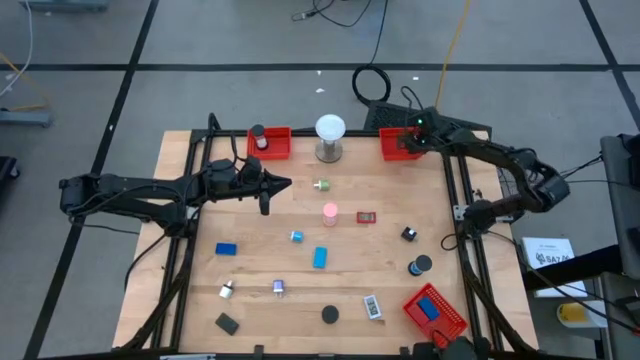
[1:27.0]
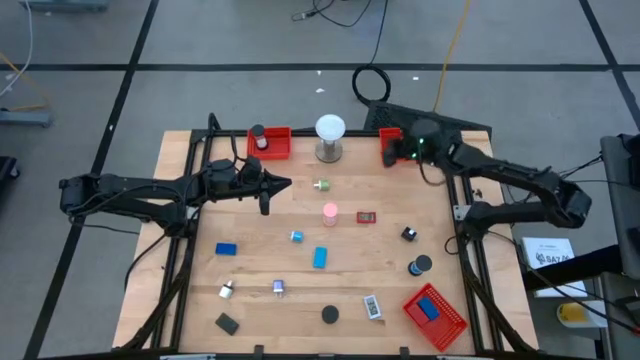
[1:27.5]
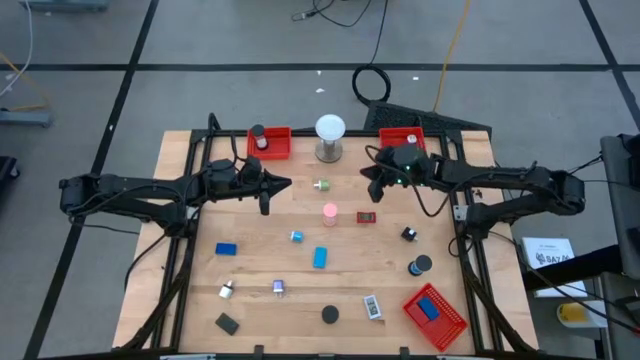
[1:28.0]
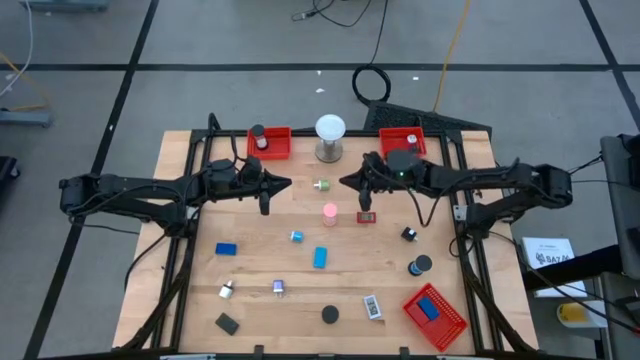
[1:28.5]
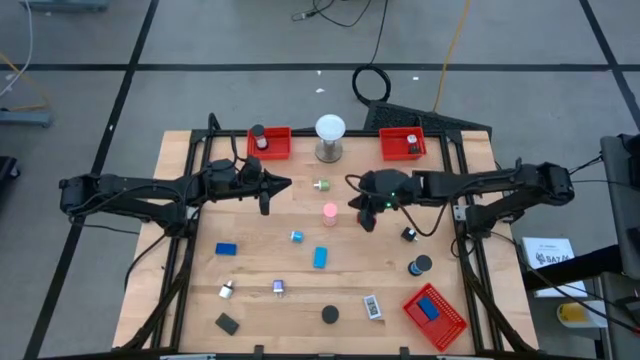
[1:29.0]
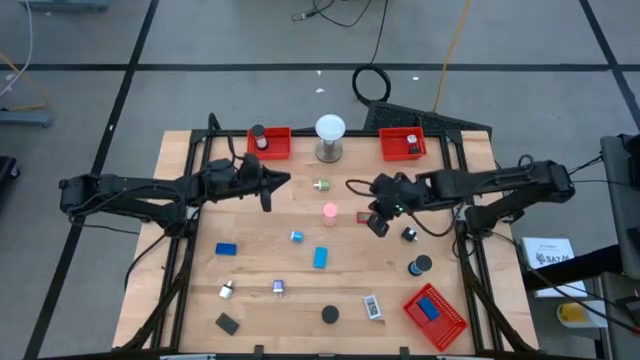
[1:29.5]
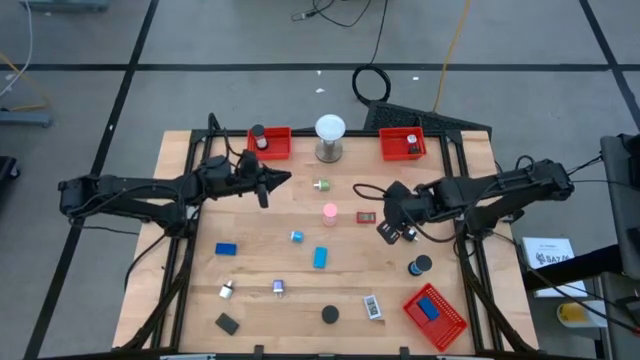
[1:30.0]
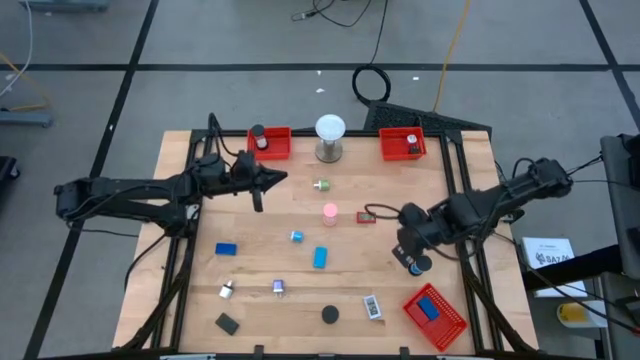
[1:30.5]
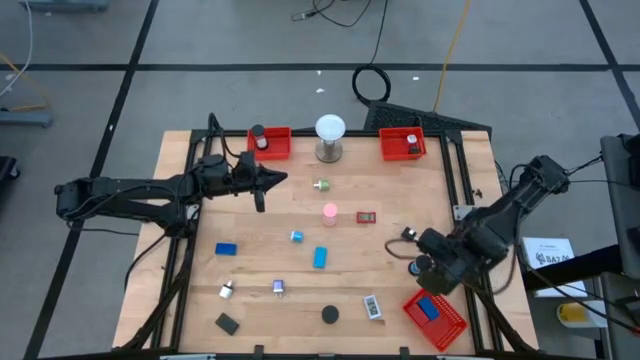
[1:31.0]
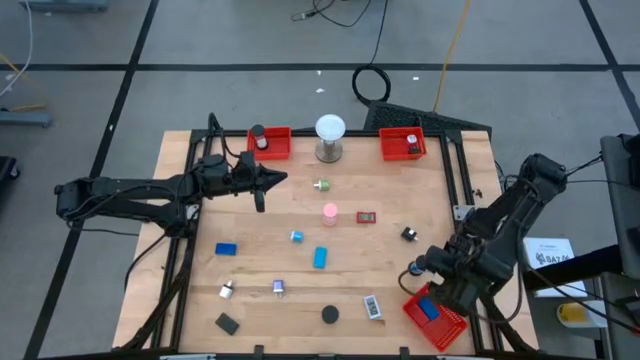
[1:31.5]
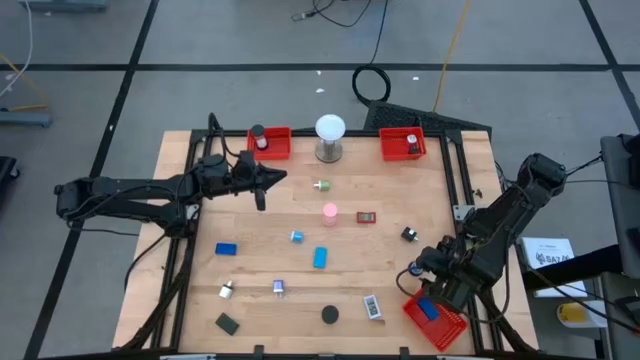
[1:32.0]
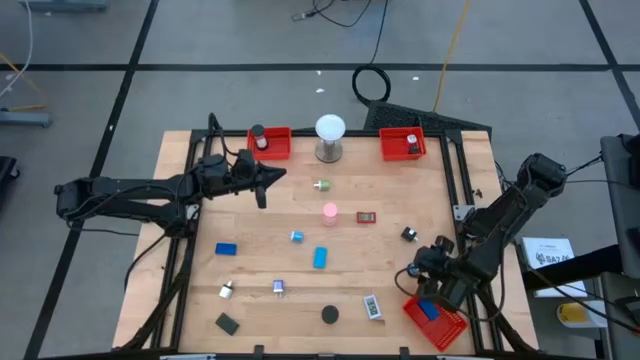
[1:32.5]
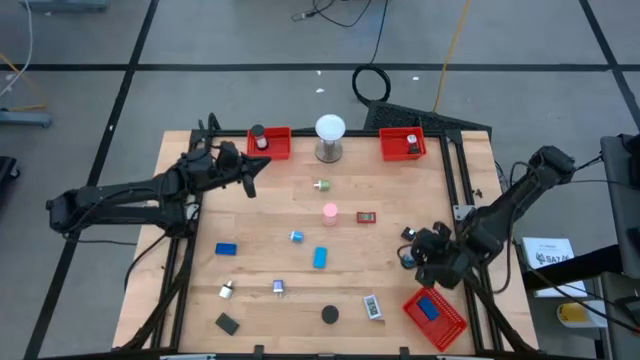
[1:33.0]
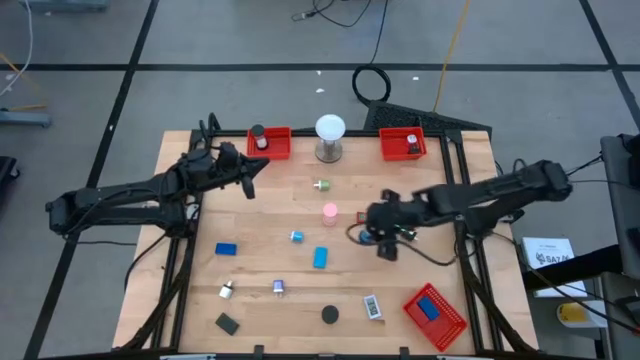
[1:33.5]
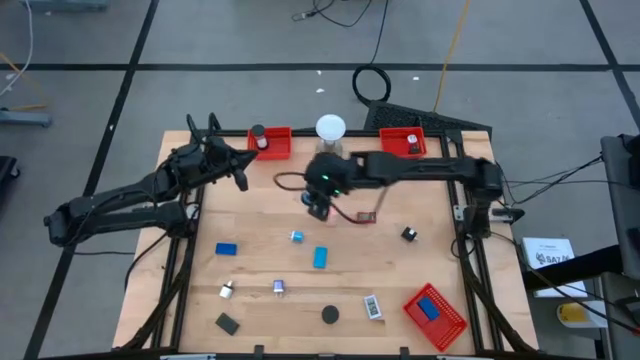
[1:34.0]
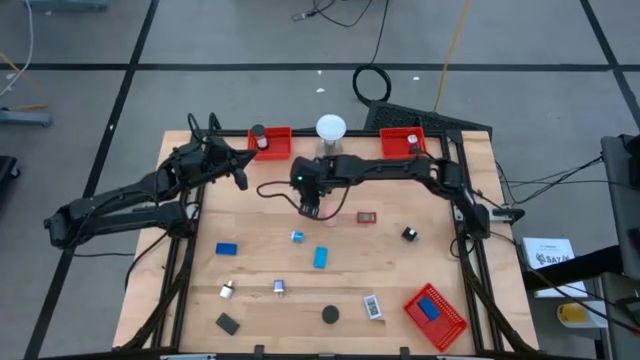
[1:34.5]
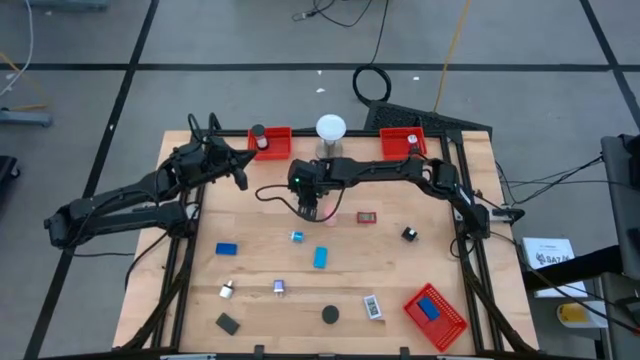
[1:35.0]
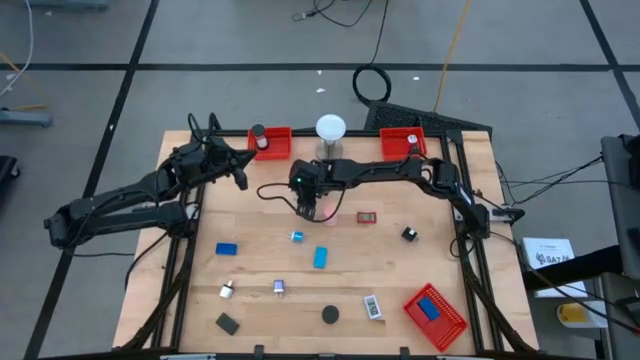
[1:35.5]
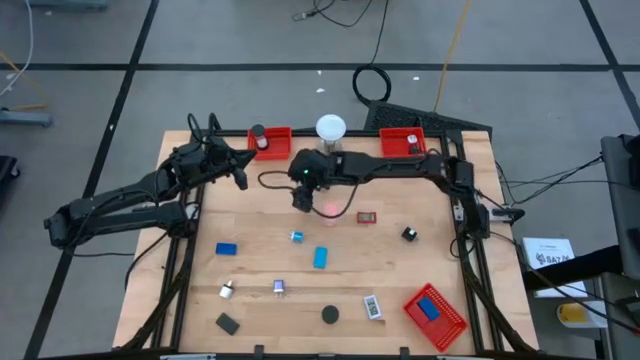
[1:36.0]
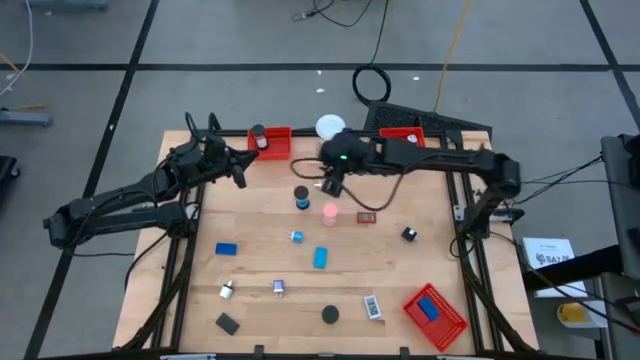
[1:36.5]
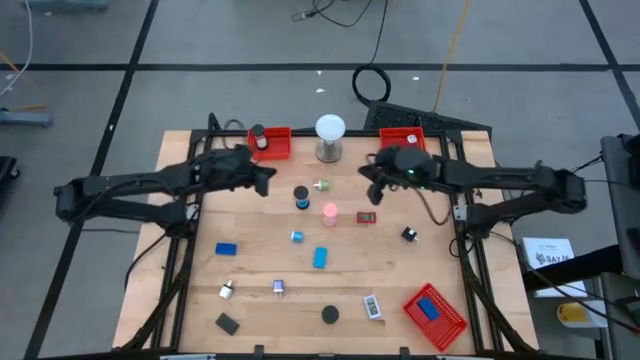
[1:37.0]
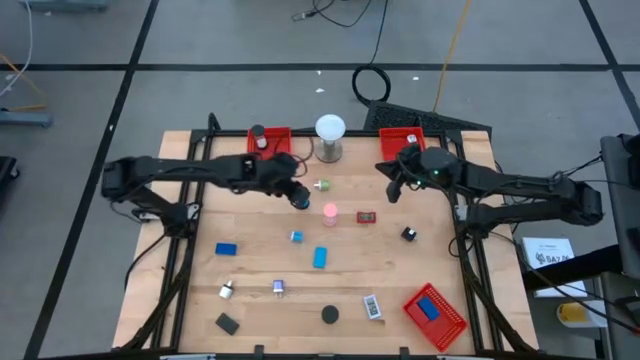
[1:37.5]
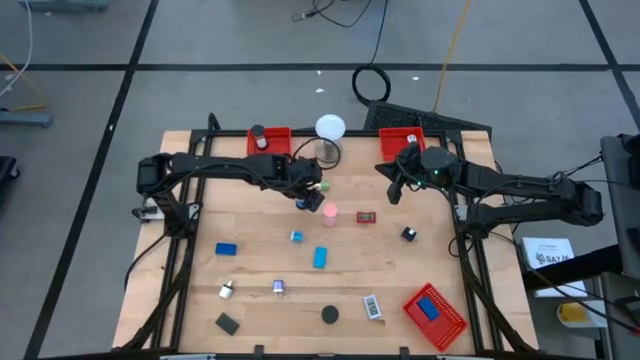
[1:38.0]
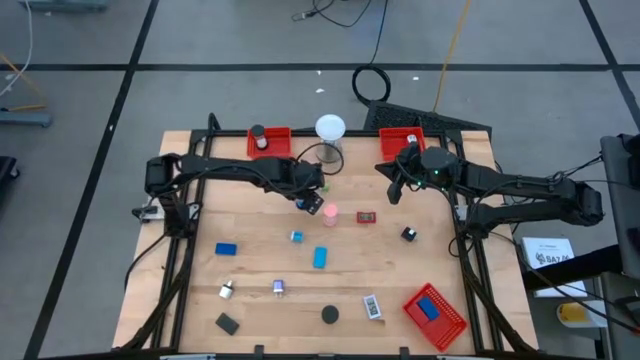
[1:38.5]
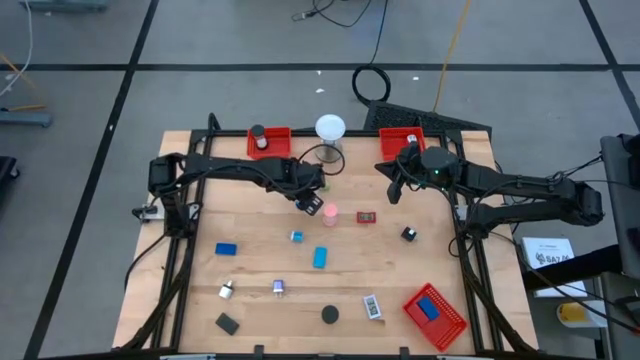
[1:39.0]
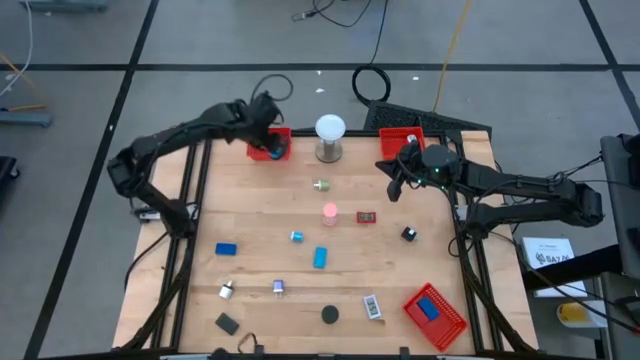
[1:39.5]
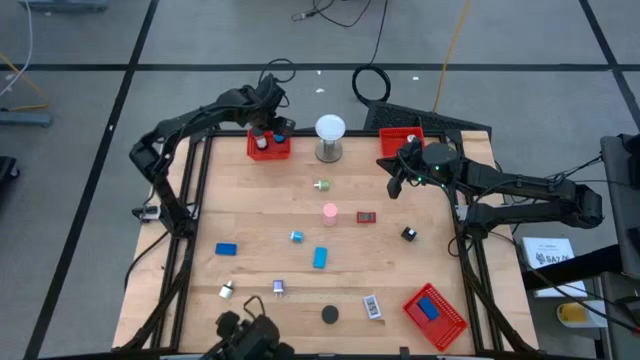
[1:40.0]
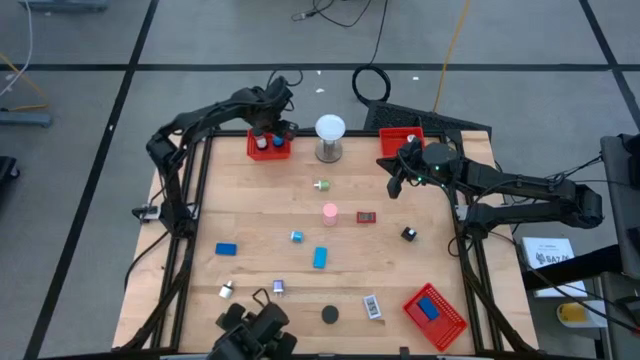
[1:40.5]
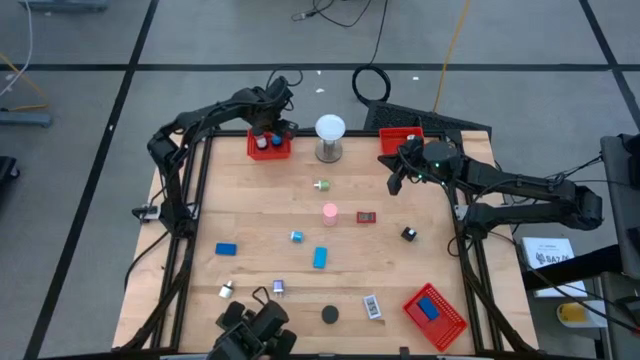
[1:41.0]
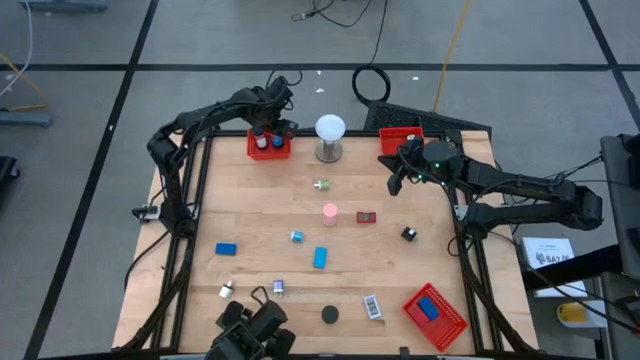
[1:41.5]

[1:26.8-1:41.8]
Task: Pick & Place Office items
Put the blue hourglass into the top left red bin
